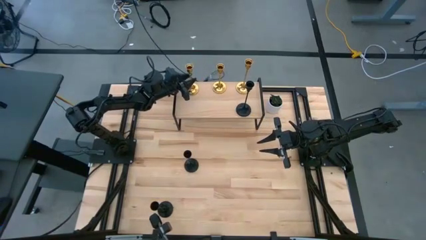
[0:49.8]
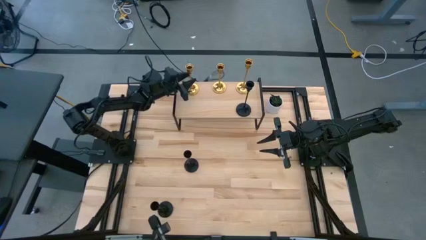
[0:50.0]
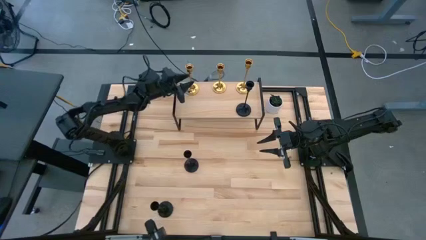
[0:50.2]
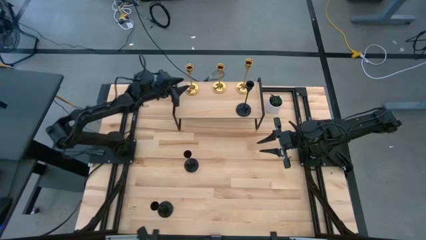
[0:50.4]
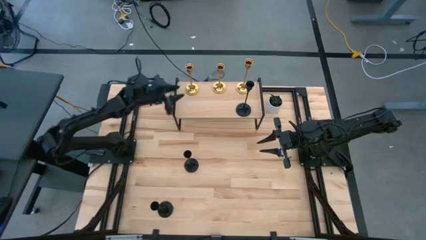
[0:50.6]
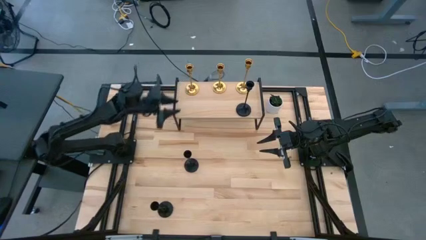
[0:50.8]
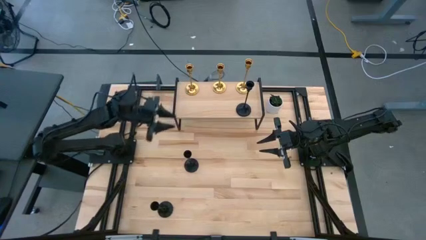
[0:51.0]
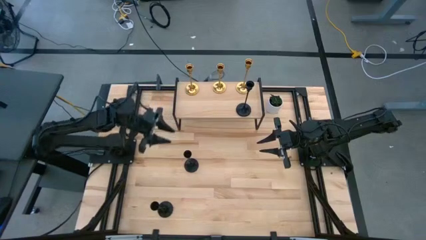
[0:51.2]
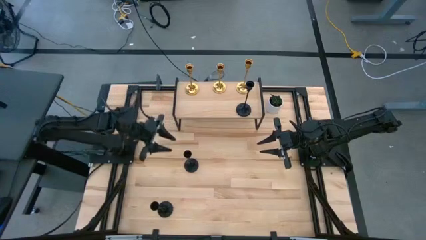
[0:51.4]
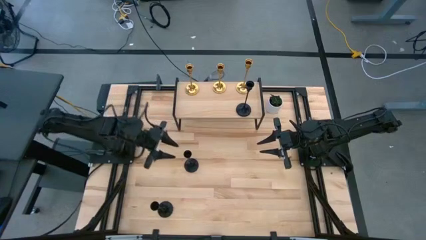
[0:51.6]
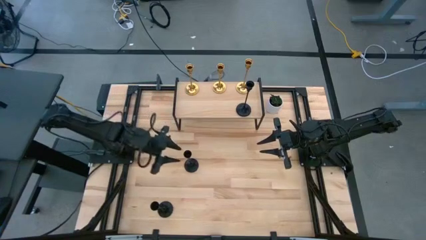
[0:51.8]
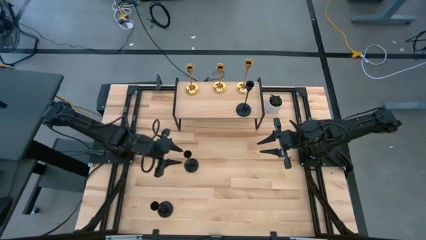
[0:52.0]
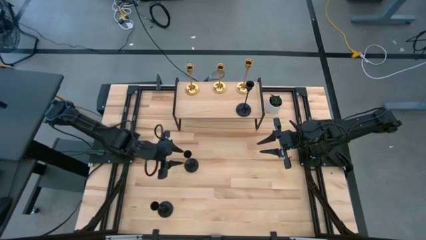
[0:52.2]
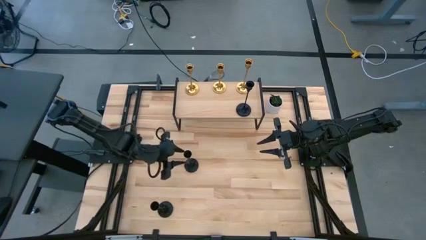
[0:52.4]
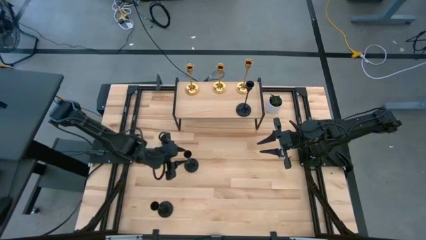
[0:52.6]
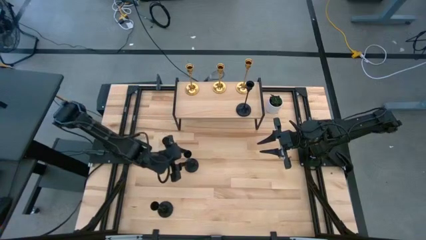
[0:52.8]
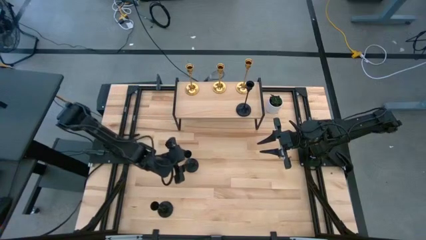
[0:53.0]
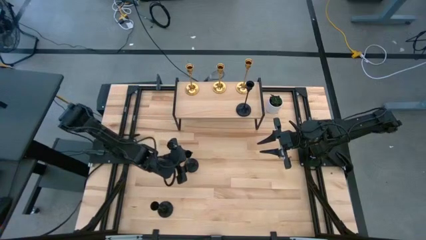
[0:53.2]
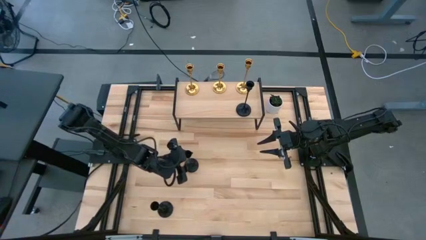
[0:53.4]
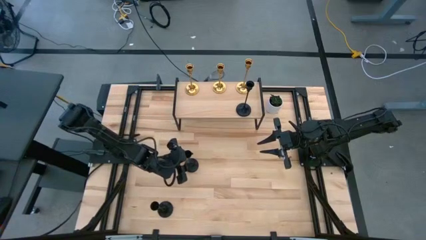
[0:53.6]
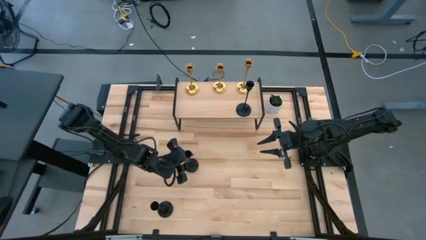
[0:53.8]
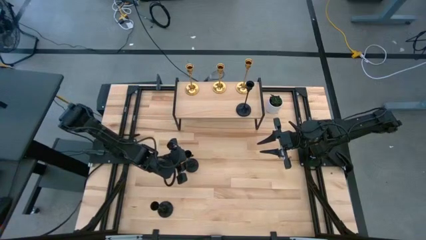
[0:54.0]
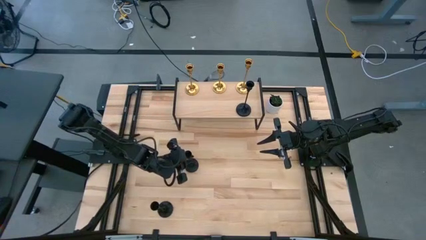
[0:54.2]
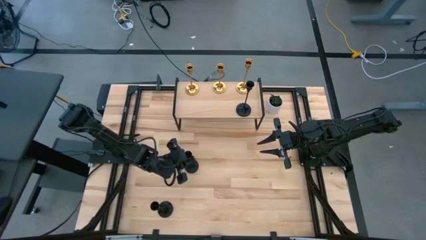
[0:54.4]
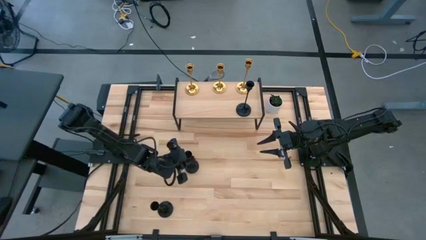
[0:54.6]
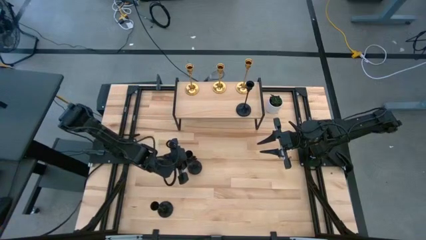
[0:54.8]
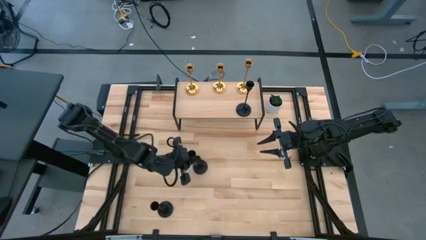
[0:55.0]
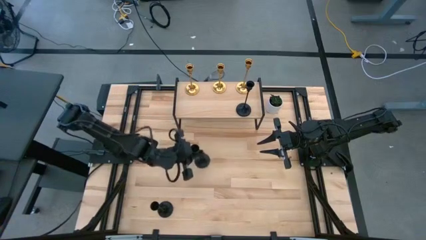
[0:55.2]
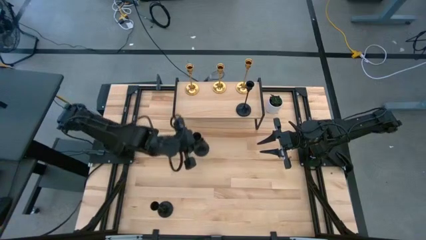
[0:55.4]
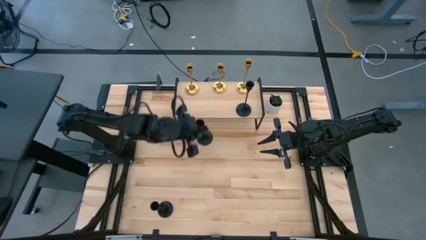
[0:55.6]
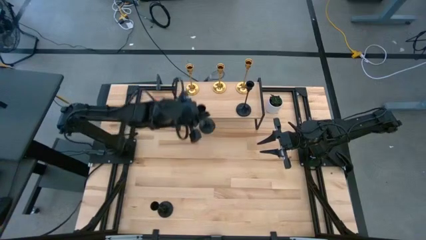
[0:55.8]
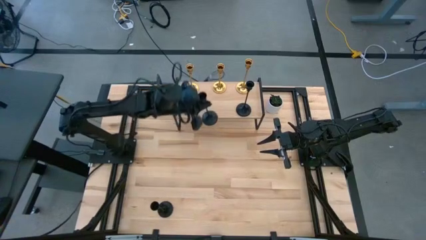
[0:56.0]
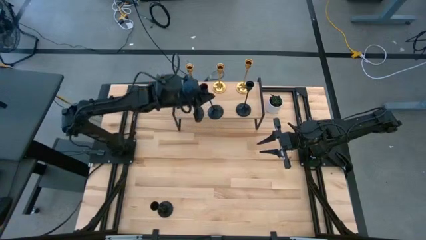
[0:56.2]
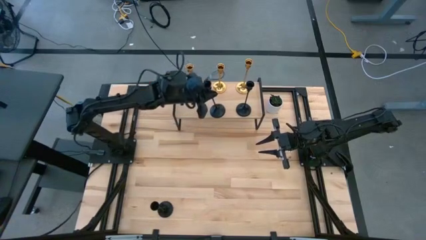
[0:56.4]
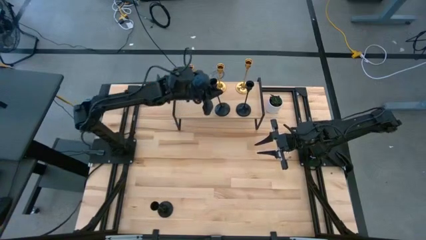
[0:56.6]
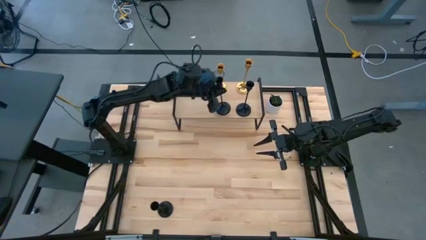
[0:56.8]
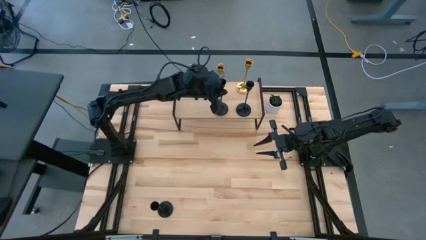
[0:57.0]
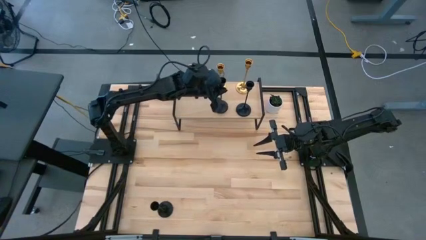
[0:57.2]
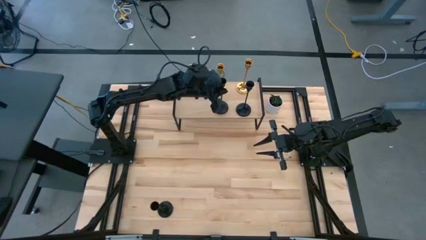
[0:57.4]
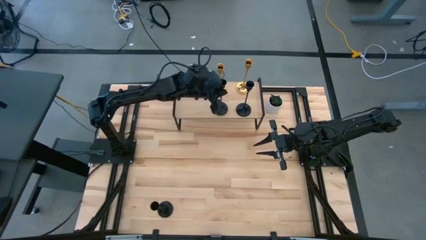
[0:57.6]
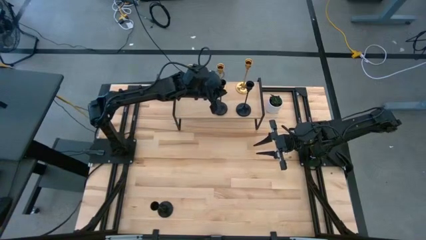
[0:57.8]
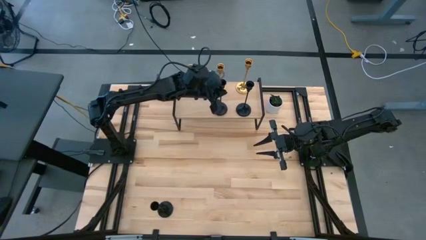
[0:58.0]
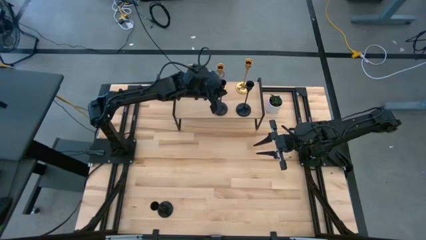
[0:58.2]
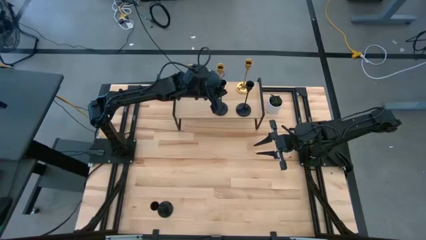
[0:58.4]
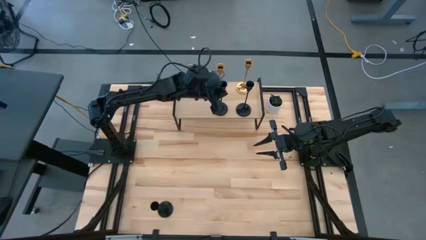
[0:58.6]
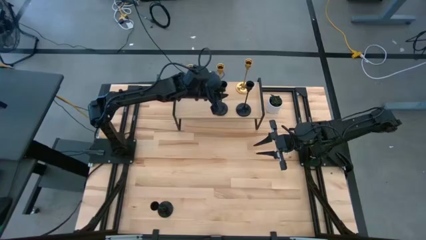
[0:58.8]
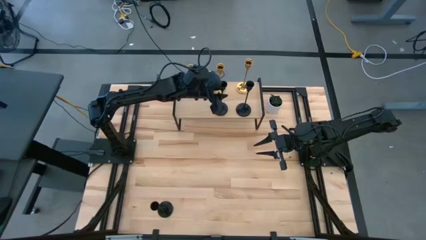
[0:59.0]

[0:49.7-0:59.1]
Task: Pick & Place candle stick holders
Put the top black candle holder on the shelf

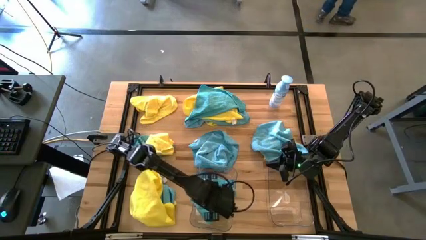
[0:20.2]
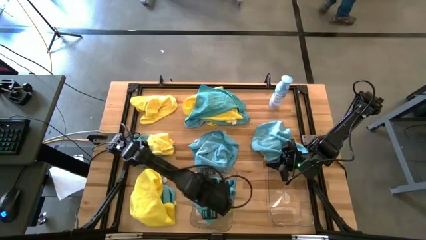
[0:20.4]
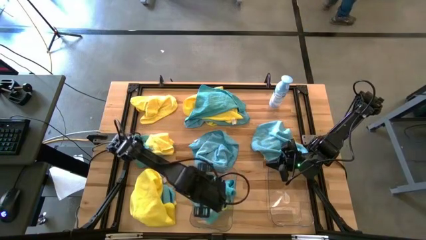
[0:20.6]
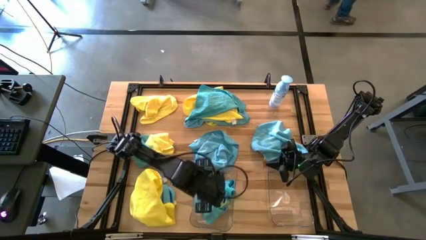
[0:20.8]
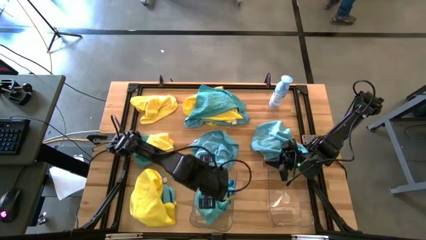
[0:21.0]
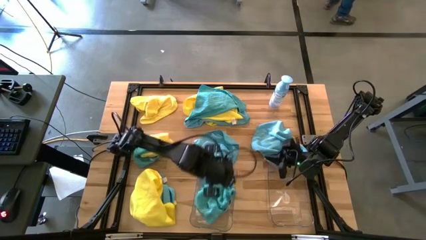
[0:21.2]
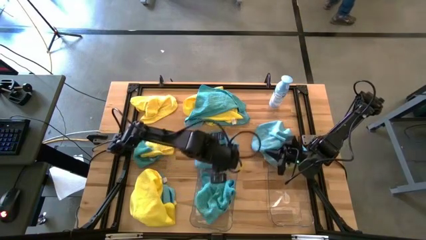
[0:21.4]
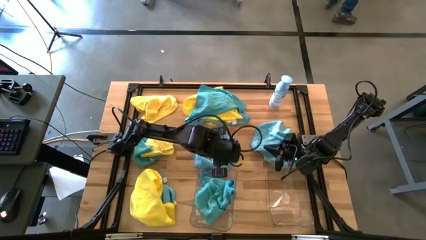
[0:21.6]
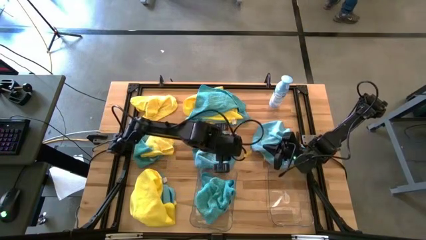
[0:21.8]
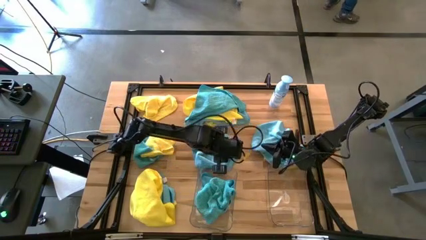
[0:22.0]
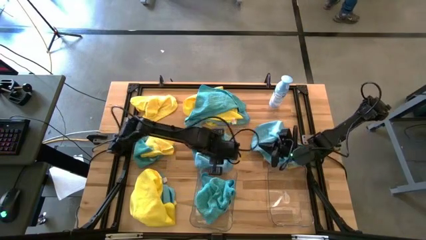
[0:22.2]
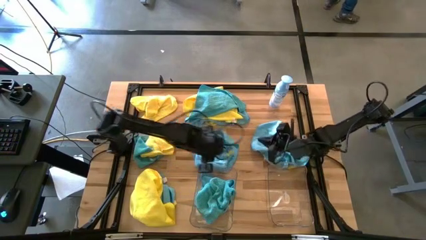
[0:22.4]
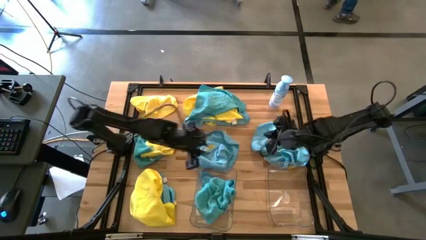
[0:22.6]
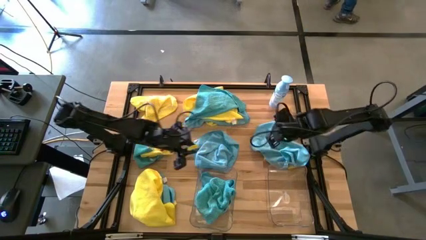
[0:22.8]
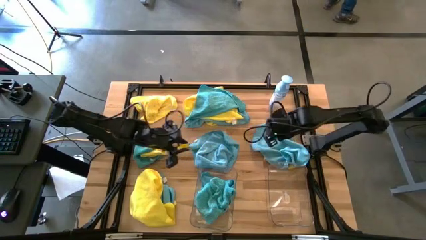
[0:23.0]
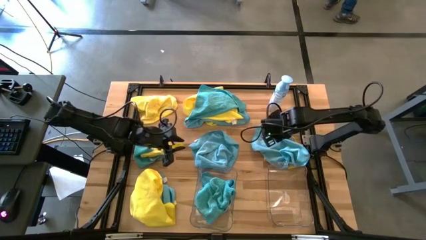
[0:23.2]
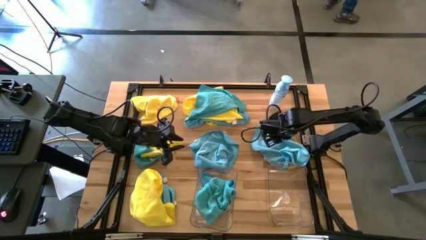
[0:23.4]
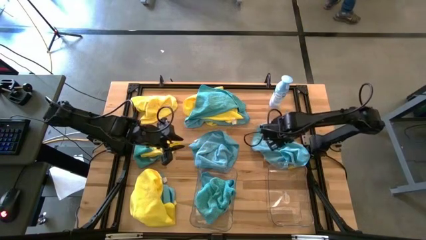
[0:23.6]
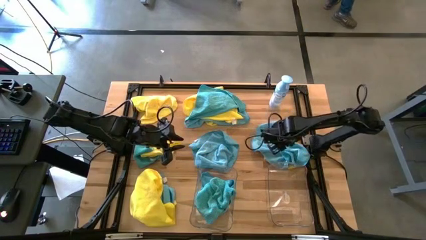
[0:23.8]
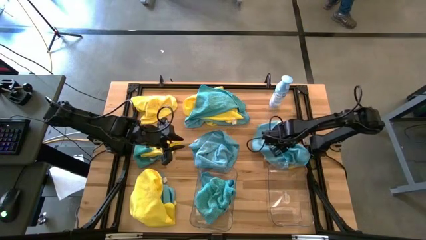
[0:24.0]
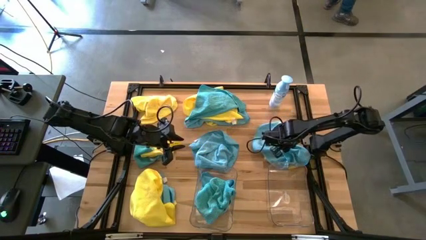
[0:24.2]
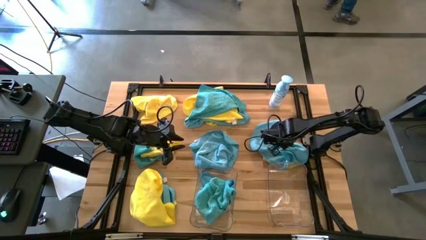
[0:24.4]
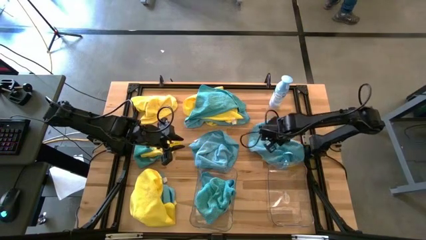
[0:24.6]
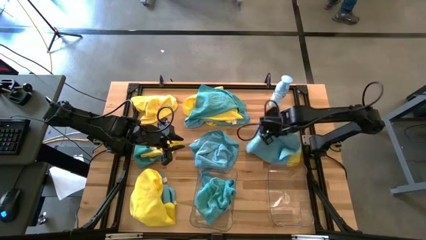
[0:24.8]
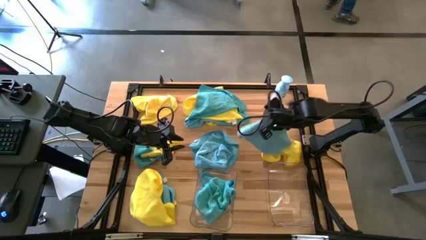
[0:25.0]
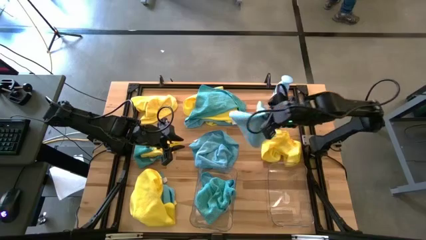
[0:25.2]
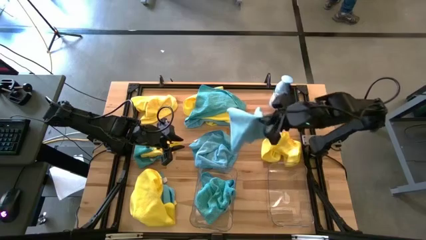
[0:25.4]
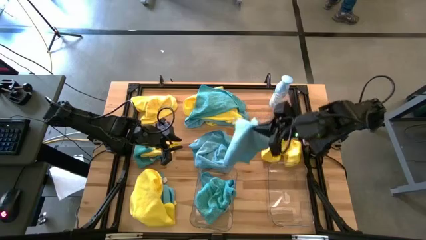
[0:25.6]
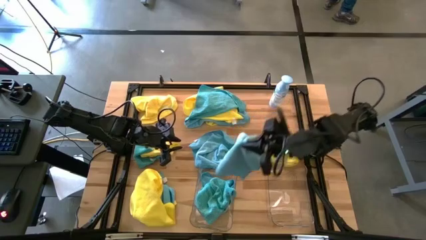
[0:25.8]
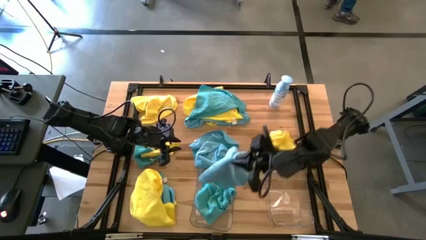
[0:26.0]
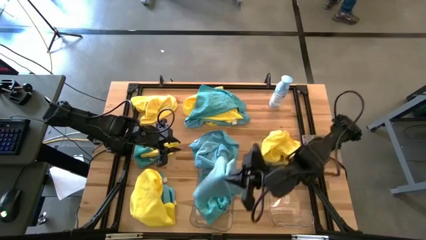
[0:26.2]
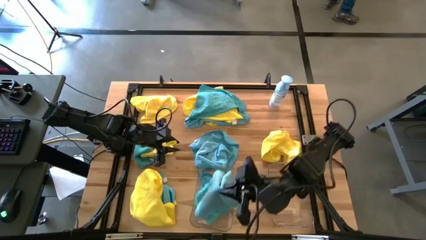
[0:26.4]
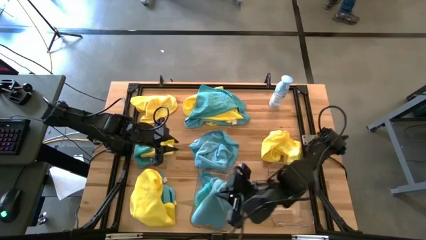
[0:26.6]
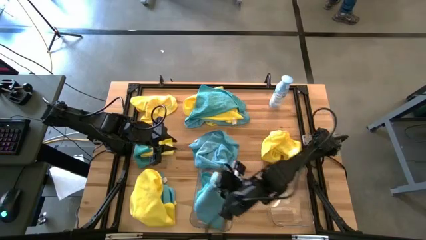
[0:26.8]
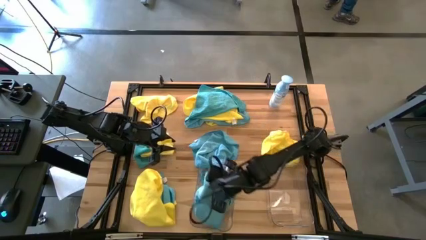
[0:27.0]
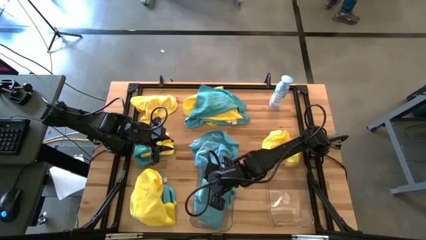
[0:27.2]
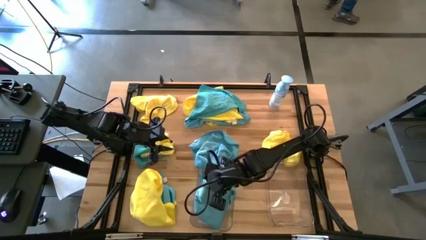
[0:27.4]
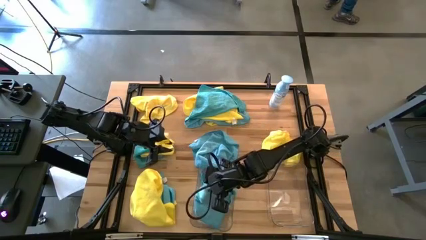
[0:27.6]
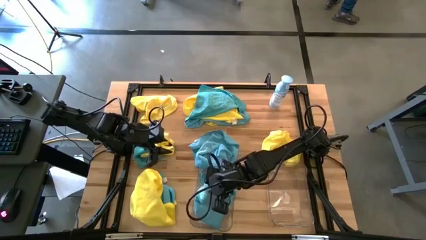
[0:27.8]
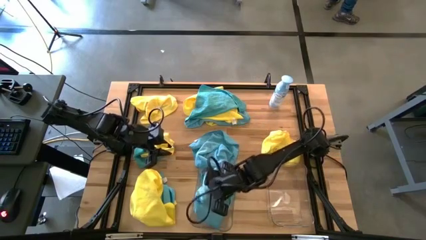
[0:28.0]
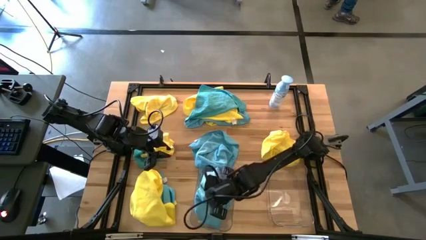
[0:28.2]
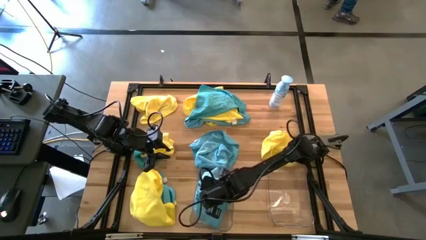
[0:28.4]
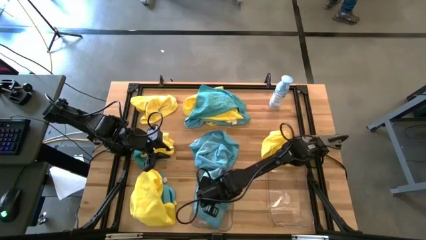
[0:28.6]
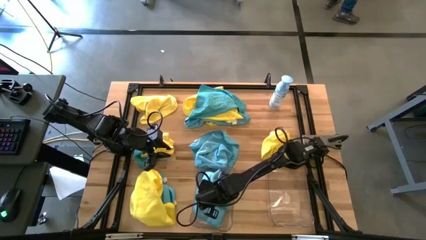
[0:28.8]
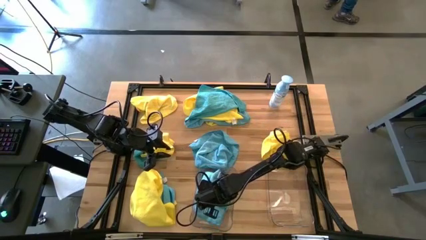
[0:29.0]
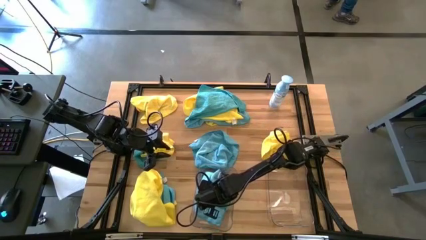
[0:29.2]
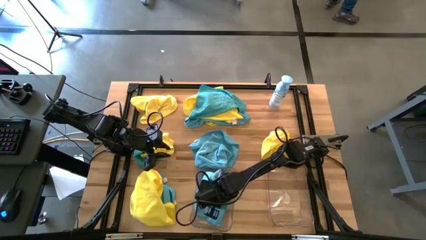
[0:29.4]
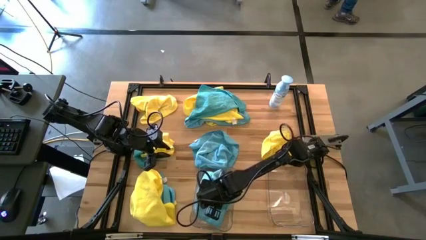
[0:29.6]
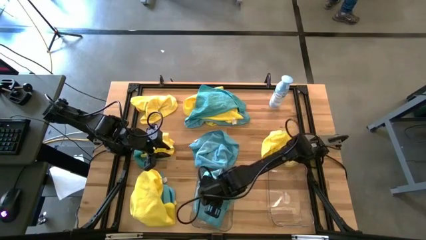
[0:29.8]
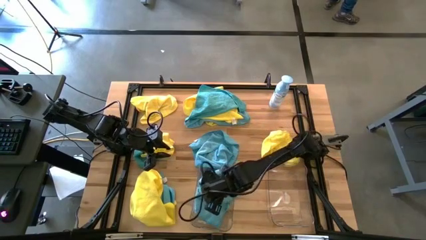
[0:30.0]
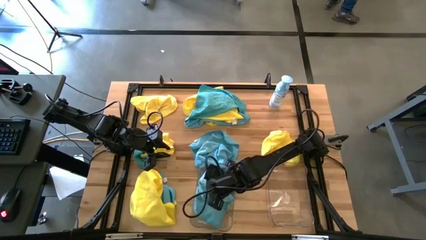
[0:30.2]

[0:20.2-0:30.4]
Task: Sort microfiber towel by color & place in baskets
Put the blue towel into the left transparent bin
